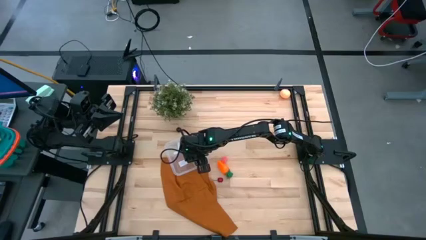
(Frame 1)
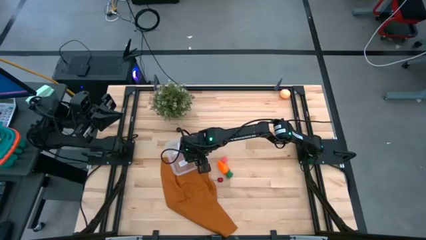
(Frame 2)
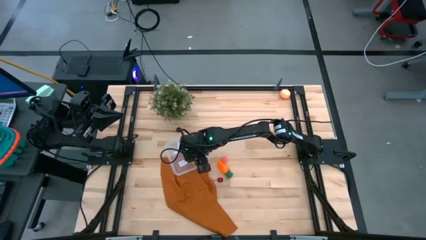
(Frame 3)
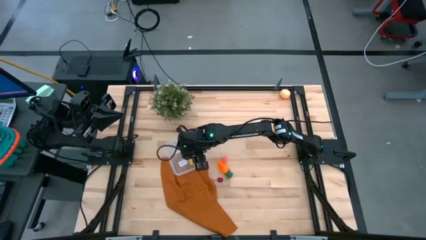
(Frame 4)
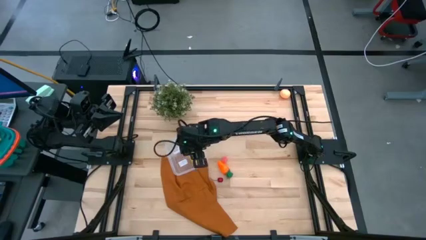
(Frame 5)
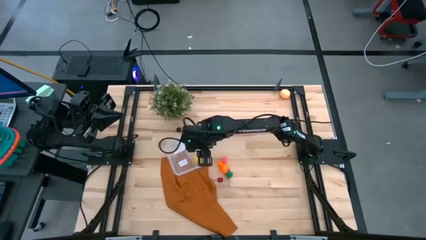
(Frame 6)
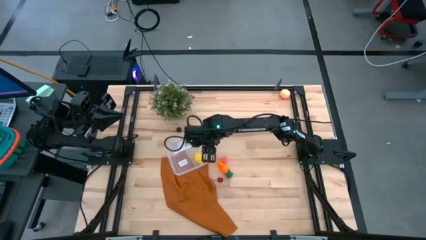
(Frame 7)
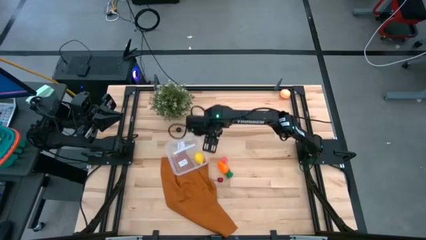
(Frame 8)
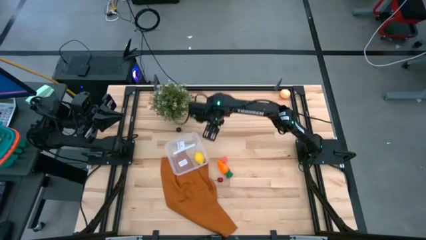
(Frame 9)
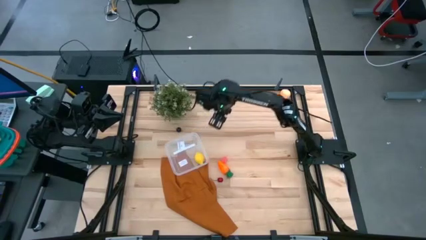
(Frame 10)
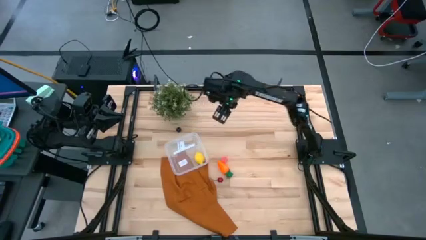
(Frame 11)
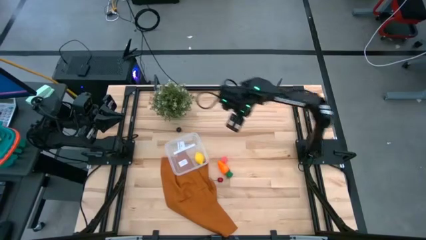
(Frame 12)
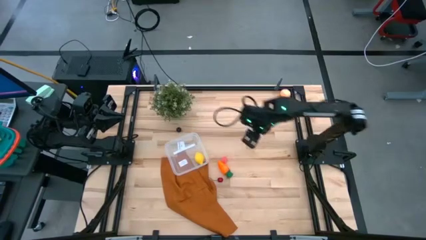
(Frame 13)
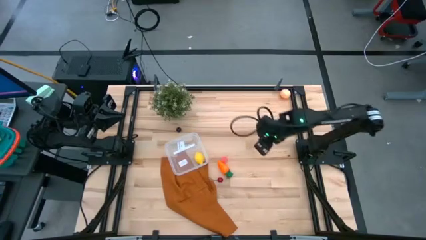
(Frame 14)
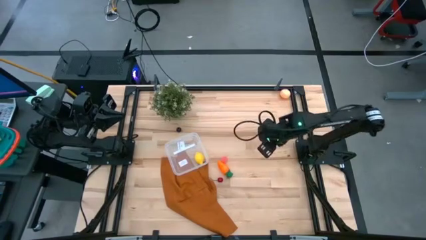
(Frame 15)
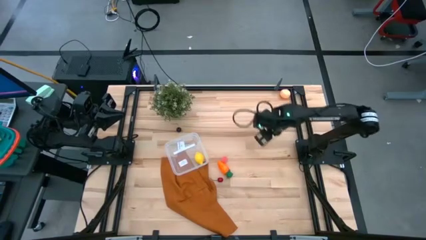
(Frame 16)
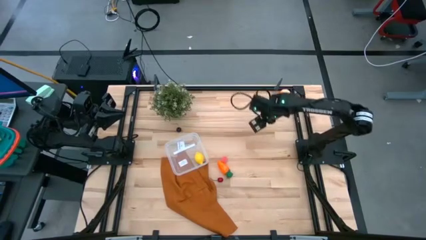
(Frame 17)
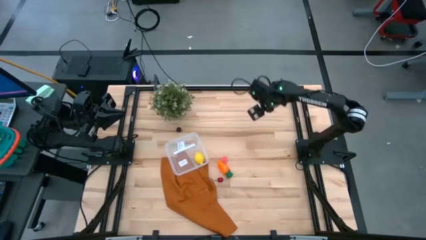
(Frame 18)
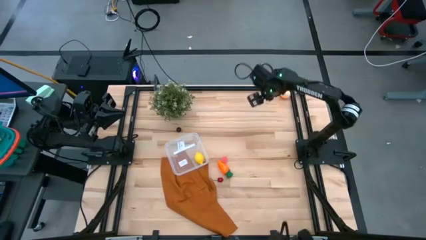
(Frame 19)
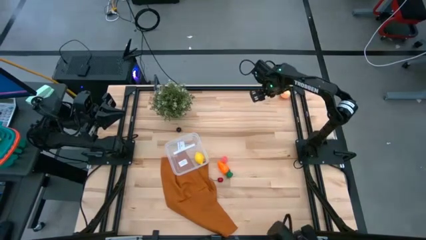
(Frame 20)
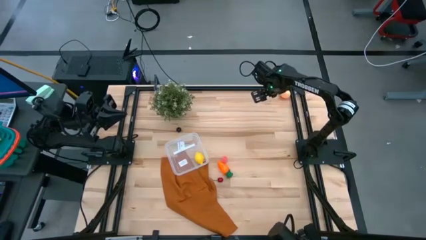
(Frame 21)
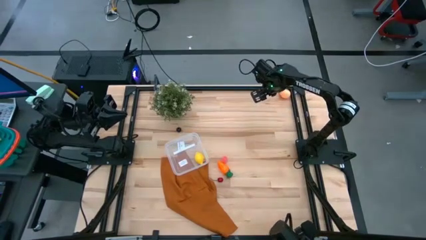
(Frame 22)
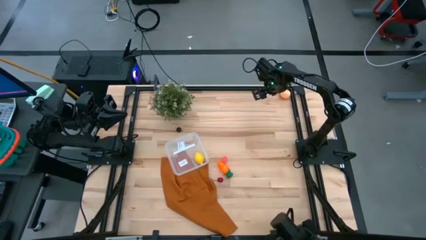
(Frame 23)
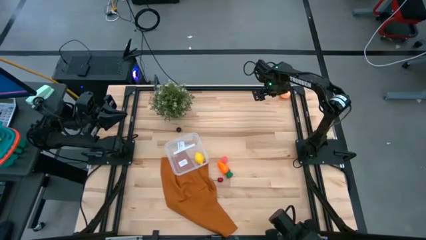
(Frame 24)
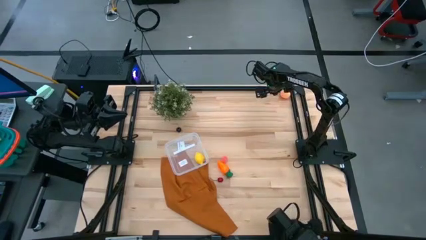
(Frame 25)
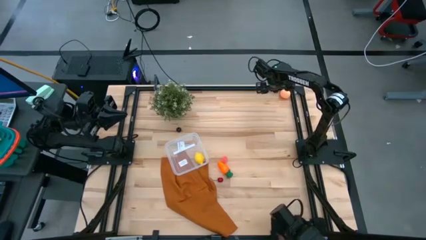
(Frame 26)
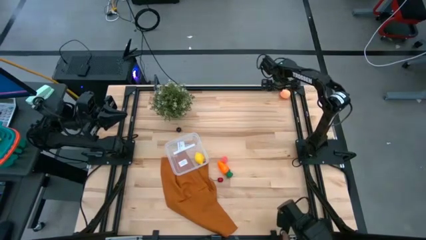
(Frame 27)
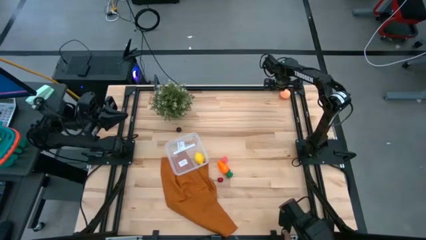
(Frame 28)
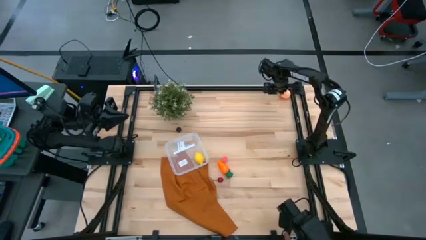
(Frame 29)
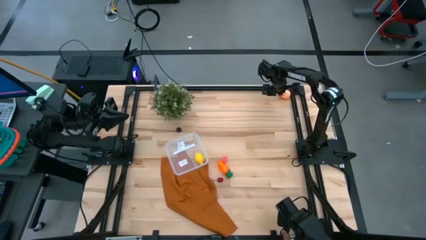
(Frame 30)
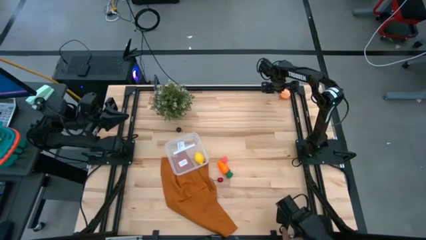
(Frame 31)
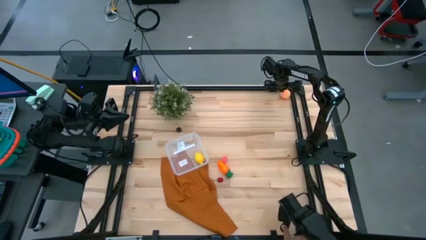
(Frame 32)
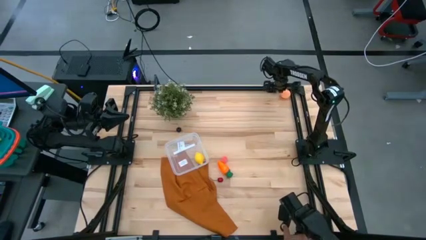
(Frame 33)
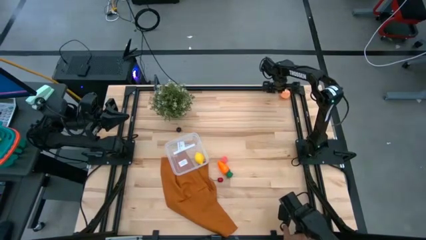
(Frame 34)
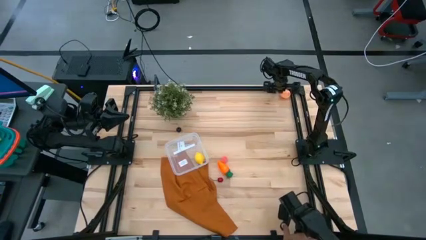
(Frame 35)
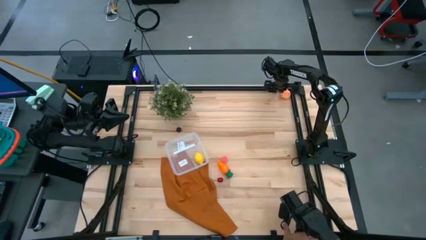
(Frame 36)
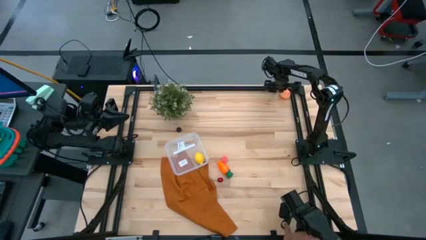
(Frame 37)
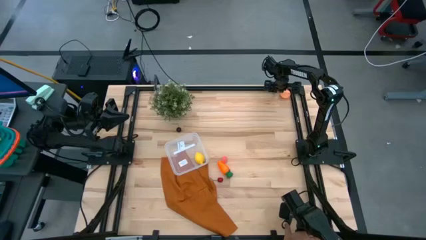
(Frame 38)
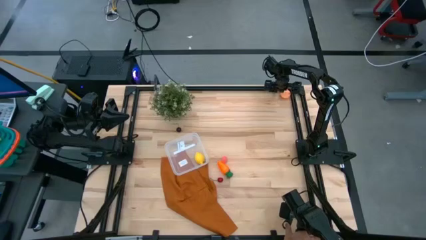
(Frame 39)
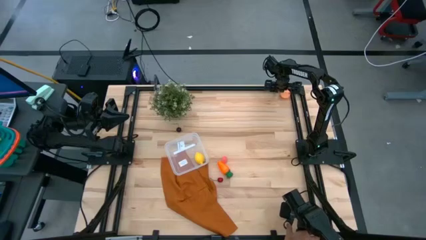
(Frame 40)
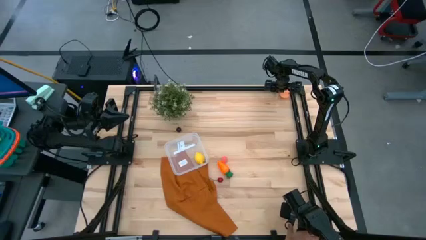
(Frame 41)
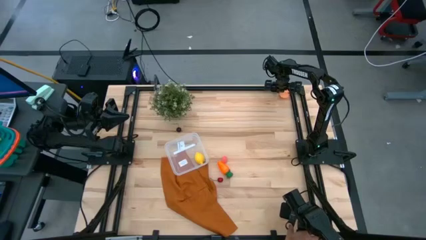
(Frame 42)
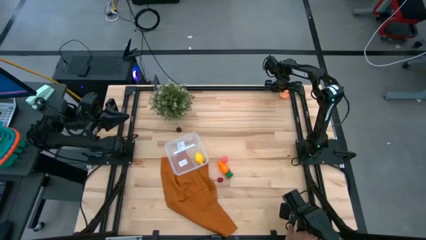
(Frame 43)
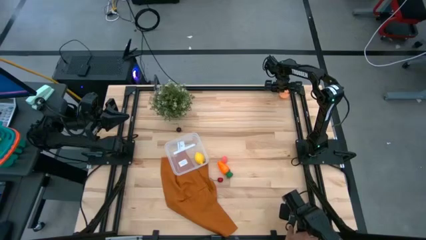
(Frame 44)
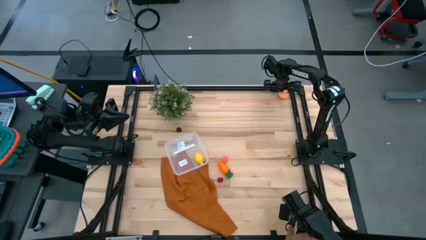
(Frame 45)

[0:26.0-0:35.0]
Task: Pick and placing Produce into tupperware
Put the top pink peach into the bin

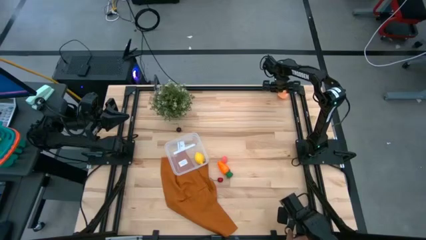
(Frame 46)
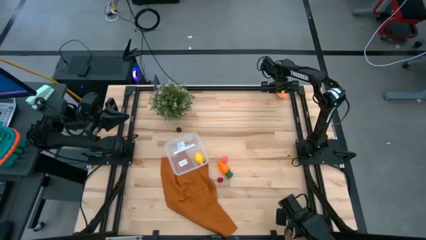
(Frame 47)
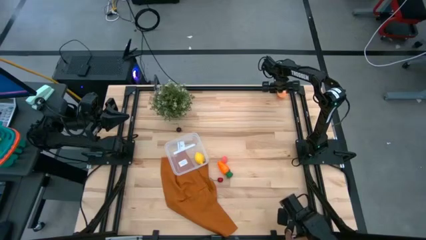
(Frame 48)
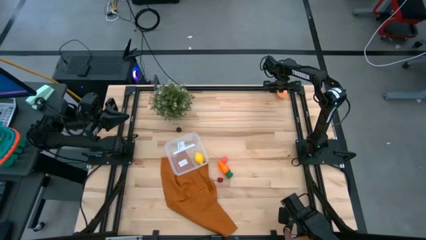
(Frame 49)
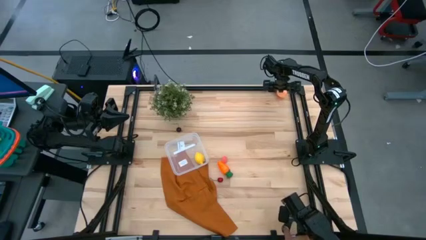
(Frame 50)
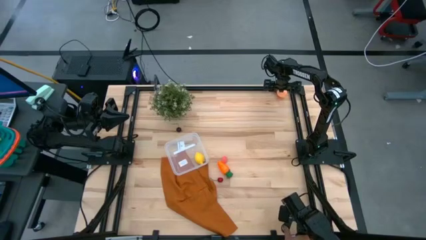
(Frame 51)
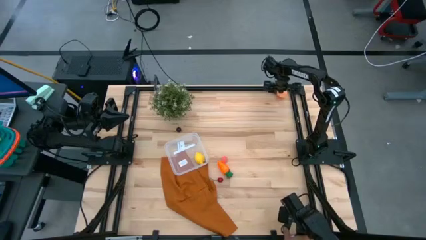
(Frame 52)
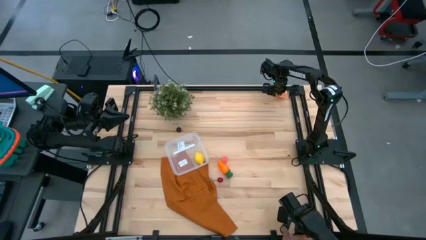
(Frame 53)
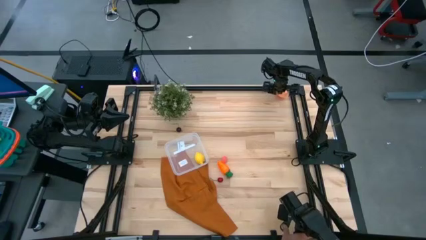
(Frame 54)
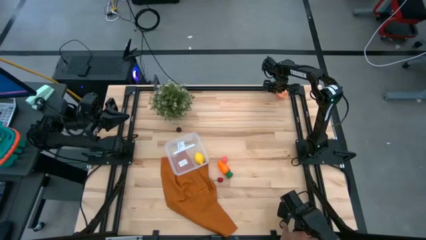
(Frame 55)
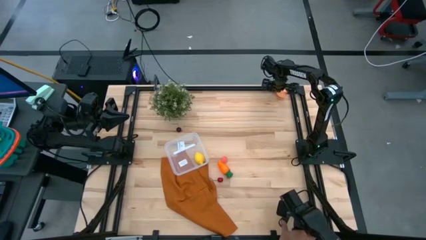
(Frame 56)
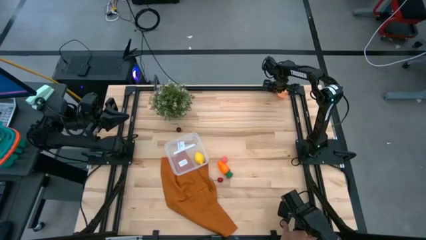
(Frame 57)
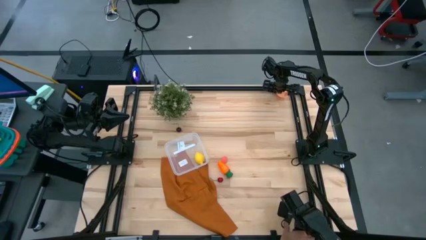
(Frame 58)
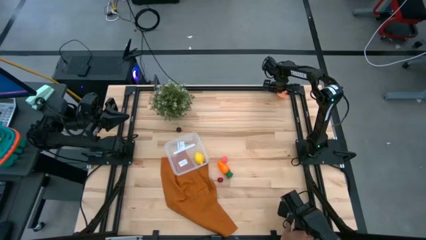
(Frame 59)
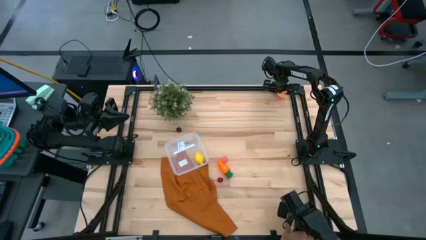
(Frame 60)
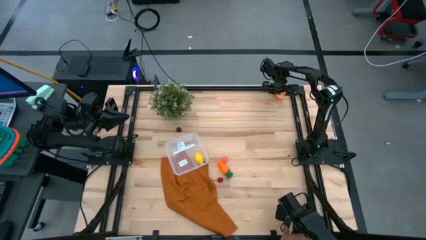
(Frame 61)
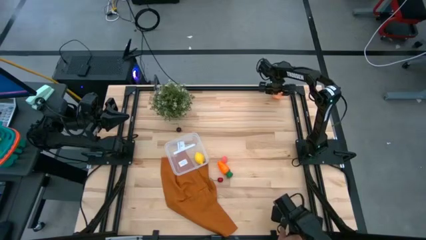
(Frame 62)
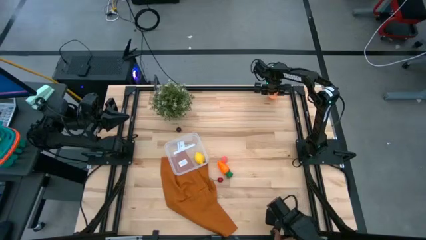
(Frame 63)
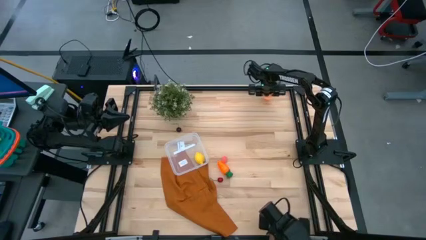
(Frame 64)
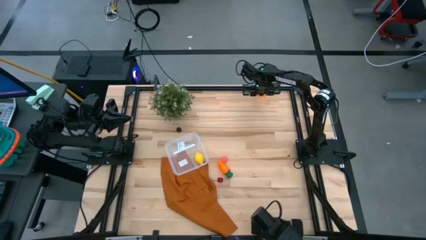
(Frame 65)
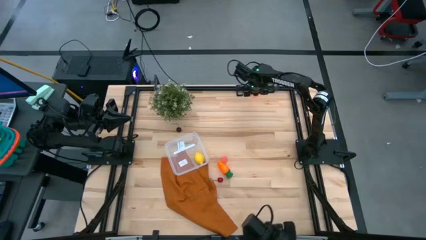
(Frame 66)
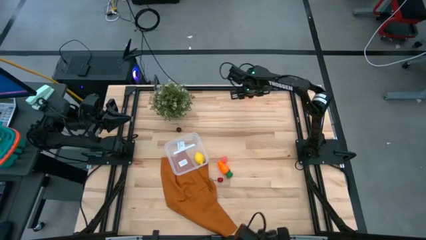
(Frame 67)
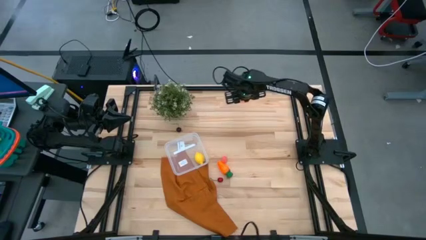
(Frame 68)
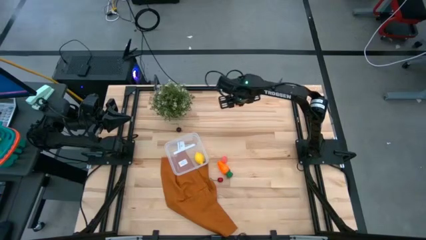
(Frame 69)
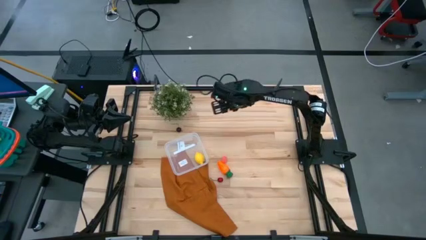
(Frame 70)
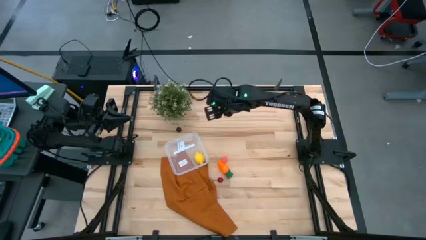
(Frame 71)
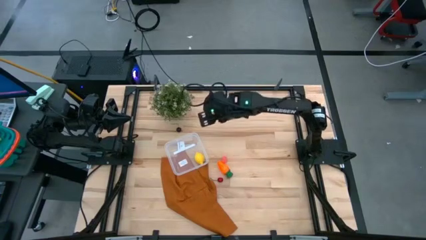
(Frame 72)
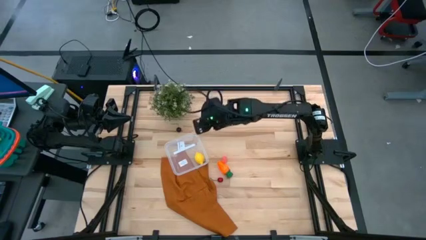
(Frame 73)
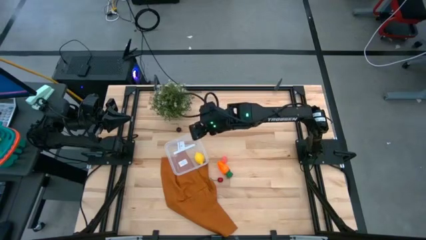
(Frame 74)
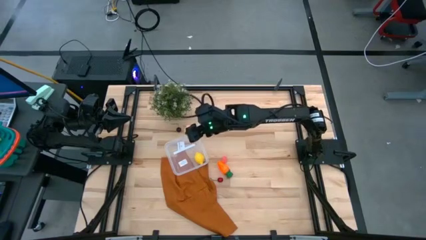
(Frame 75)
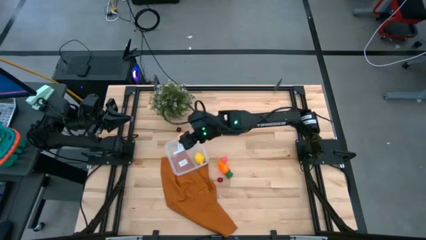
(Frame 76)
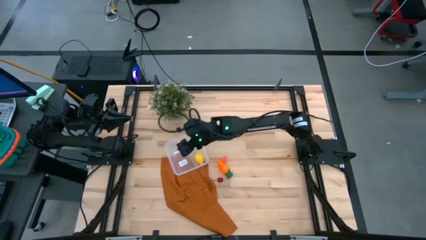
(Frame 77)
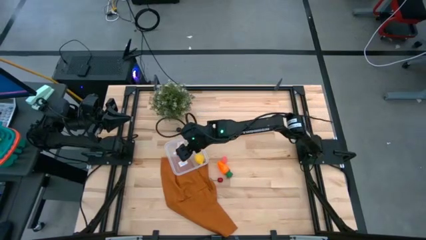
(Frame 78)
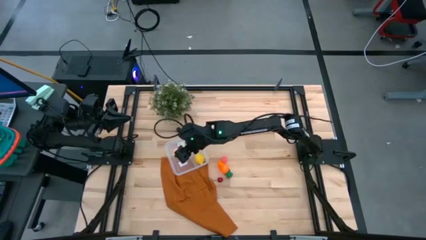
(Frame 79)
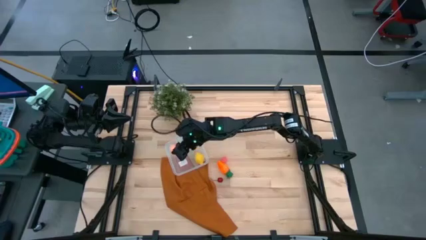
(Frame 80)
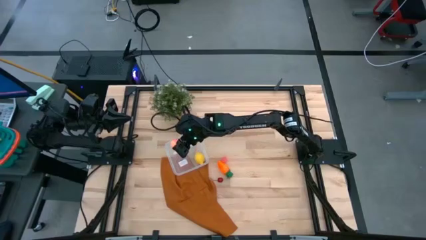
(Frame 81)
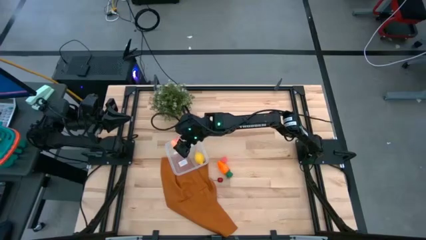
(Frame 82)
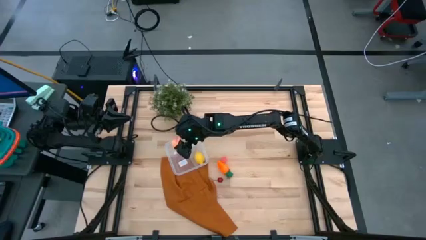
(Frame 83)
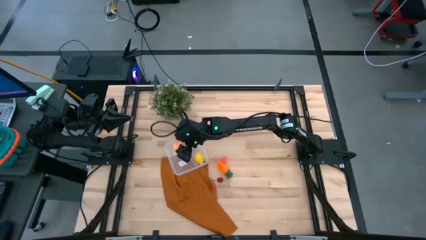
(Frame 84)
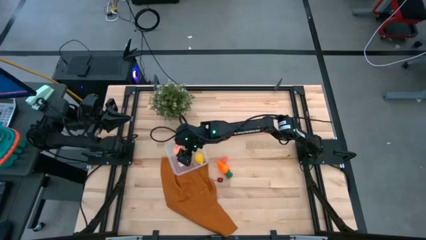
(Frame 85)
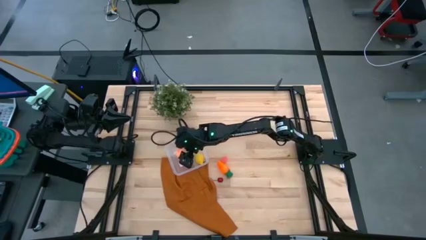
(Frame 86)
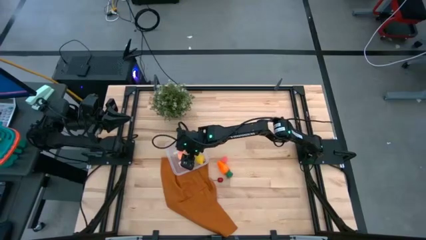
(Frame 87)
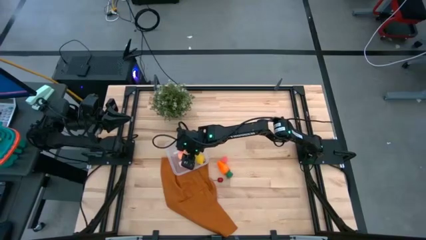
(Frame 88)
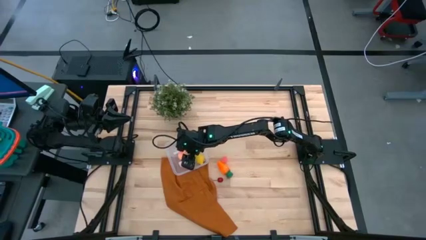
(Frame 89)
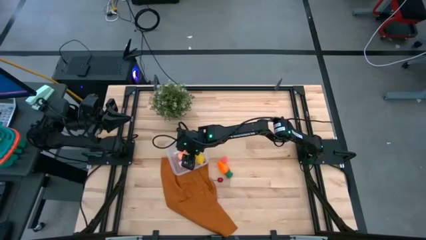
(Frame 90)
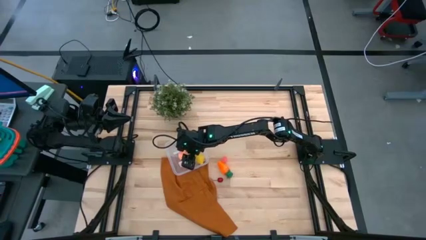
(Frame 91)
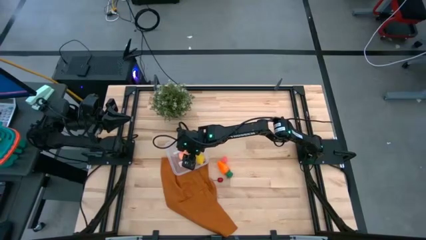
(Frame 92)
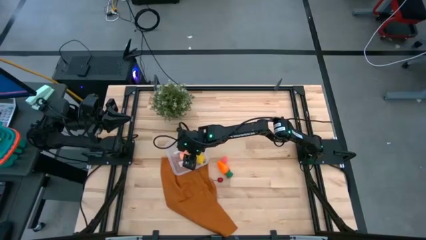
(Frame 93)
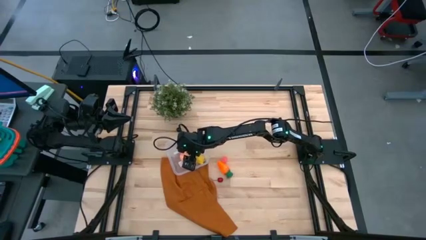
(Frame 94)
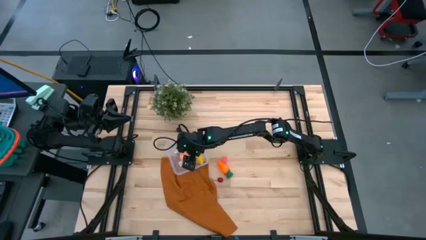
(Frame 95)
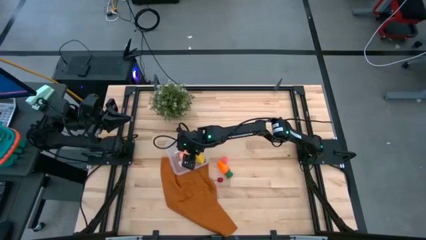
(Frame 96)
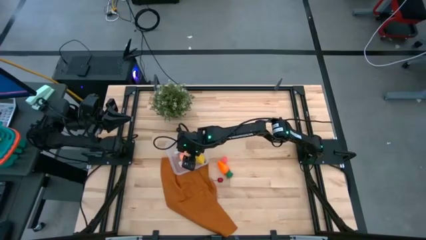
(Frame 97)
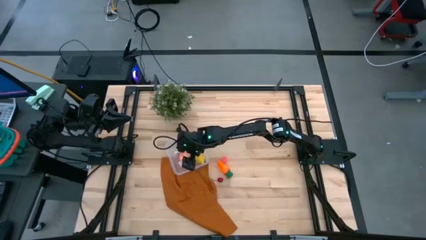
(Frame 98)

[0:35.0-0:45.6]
Put the top pink peach into the bin
